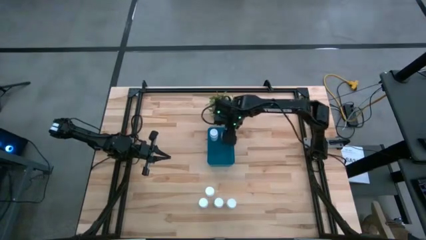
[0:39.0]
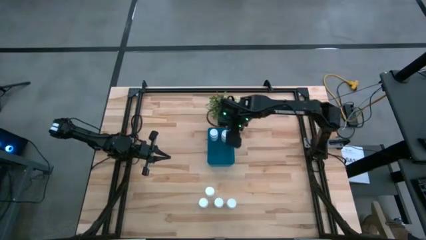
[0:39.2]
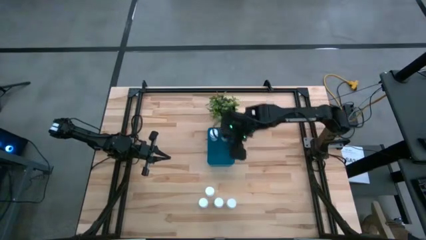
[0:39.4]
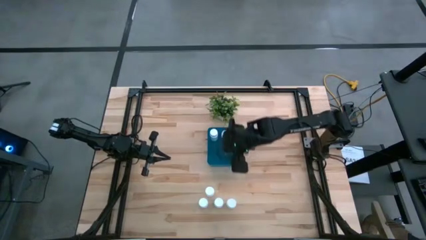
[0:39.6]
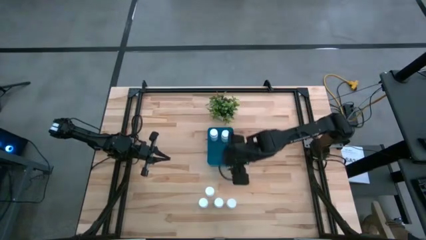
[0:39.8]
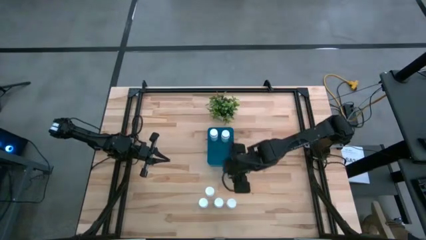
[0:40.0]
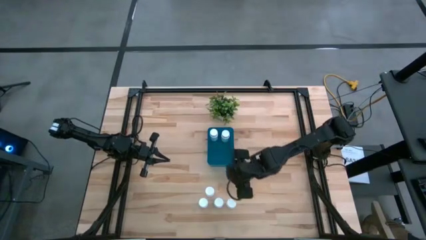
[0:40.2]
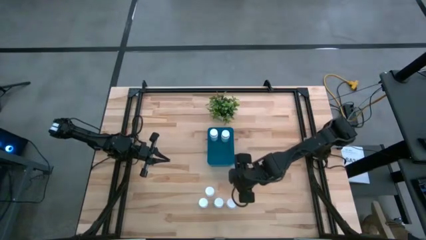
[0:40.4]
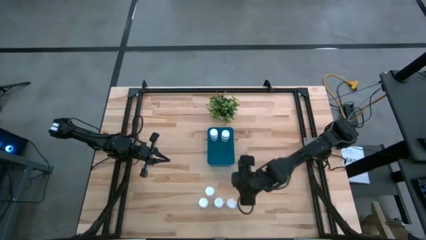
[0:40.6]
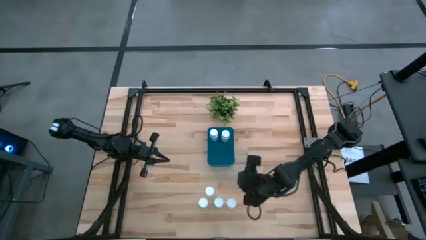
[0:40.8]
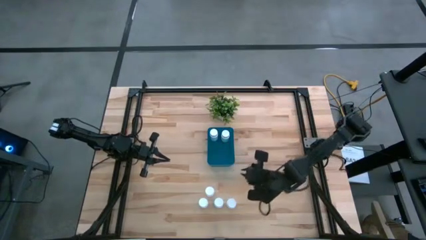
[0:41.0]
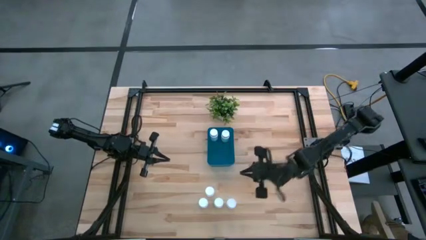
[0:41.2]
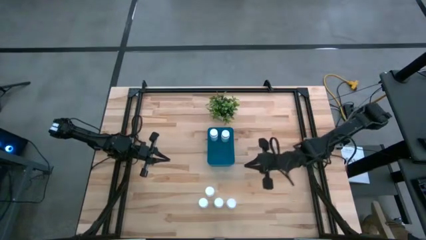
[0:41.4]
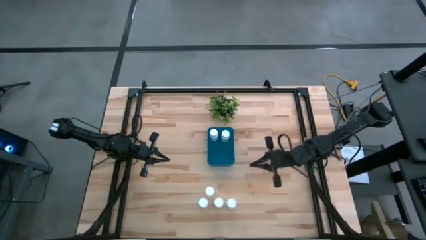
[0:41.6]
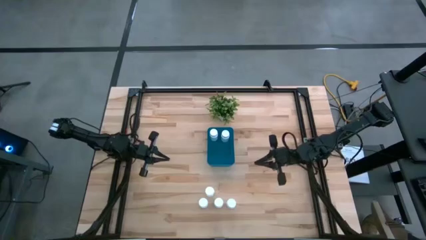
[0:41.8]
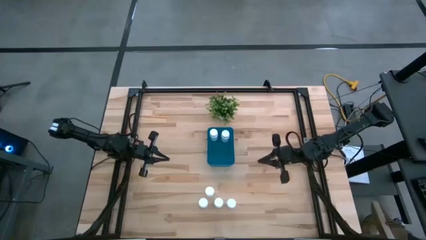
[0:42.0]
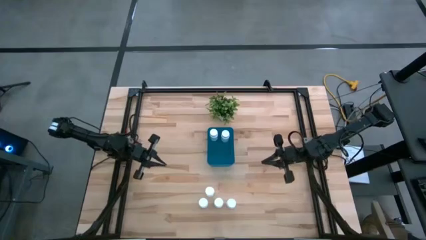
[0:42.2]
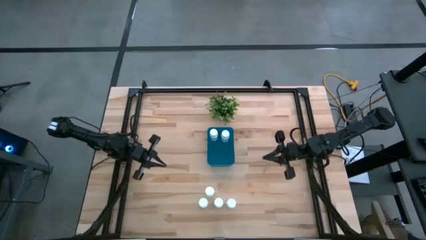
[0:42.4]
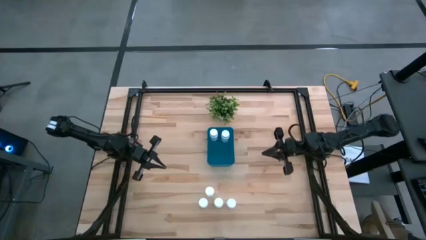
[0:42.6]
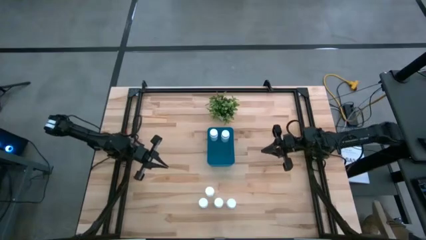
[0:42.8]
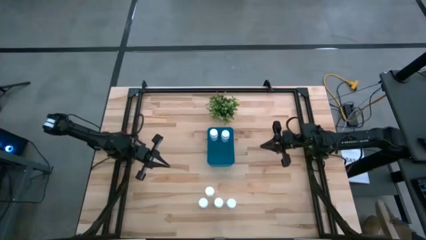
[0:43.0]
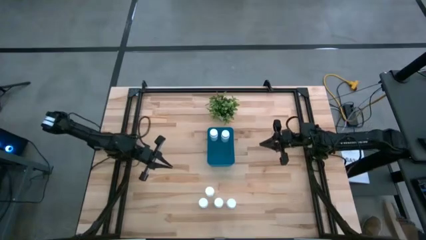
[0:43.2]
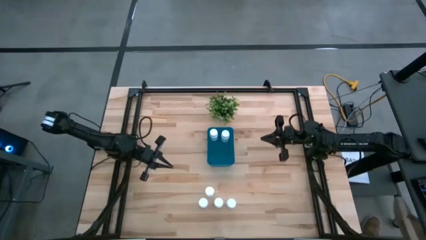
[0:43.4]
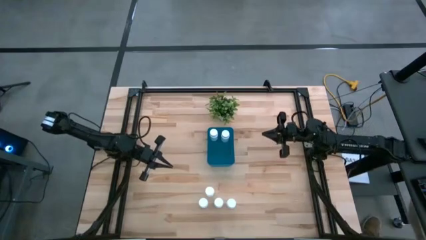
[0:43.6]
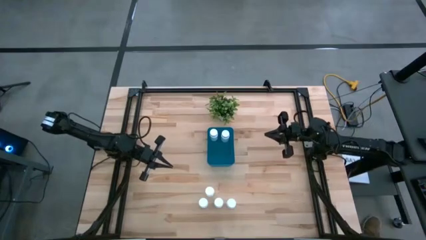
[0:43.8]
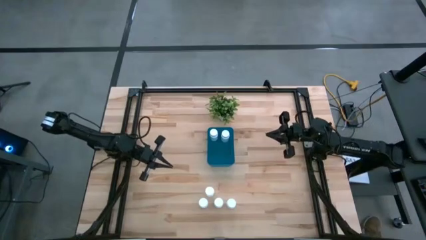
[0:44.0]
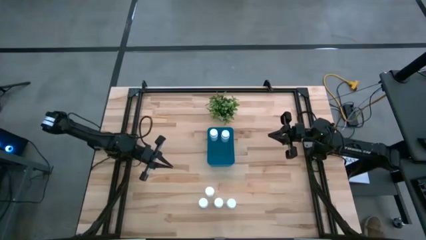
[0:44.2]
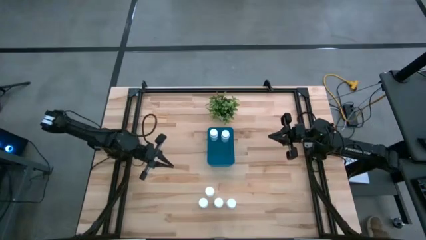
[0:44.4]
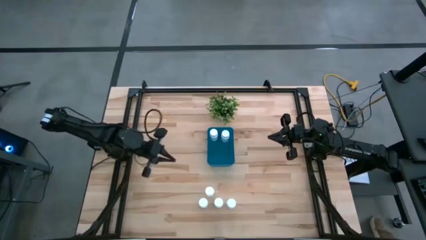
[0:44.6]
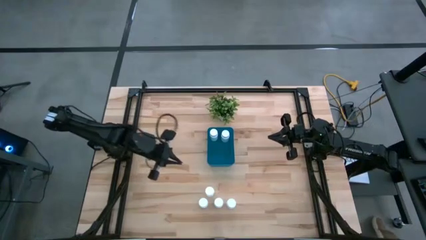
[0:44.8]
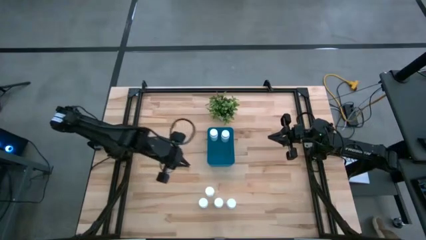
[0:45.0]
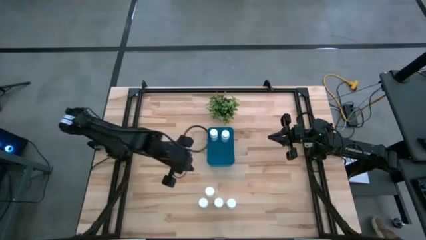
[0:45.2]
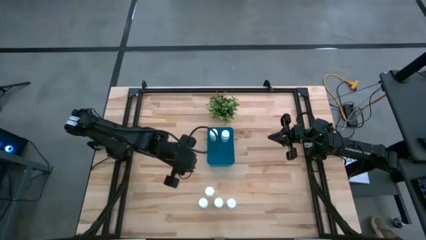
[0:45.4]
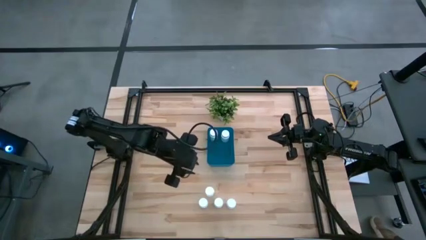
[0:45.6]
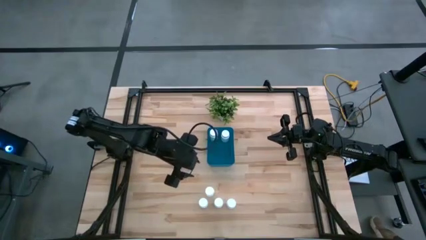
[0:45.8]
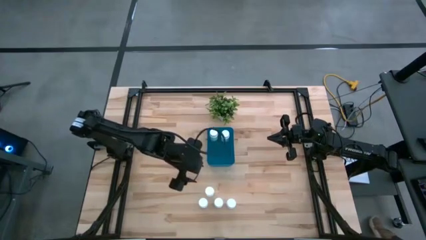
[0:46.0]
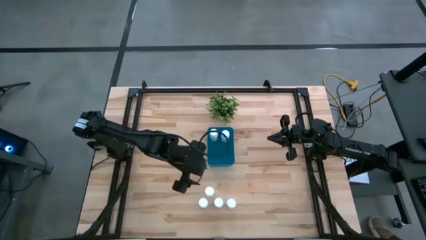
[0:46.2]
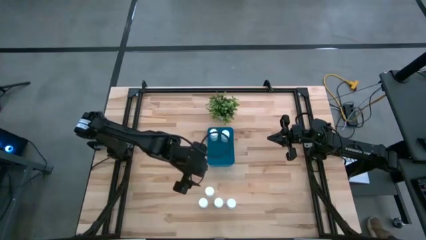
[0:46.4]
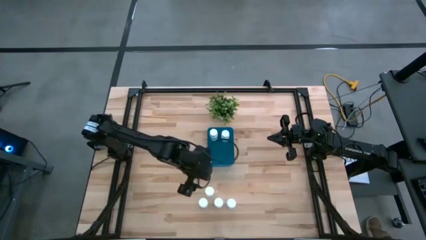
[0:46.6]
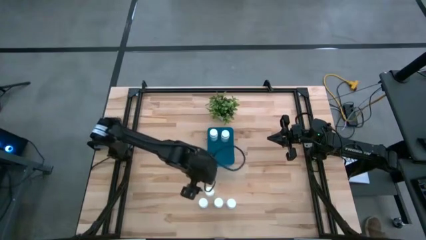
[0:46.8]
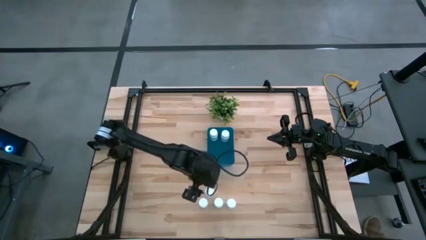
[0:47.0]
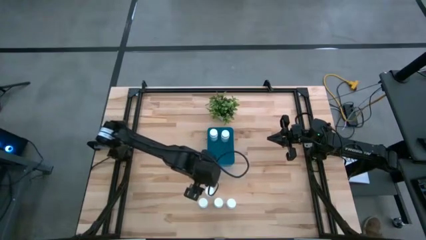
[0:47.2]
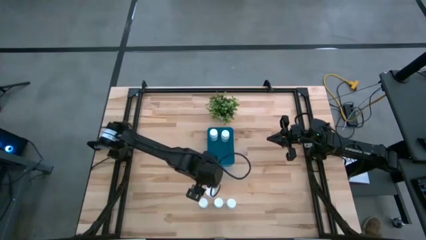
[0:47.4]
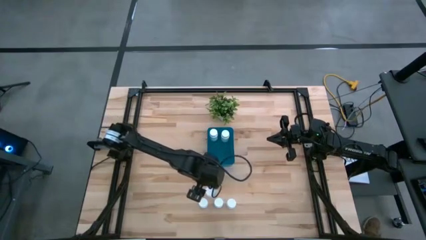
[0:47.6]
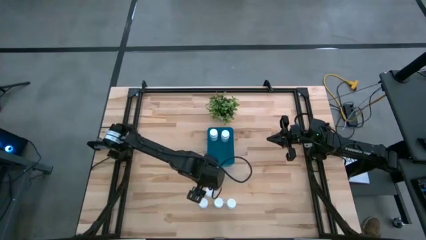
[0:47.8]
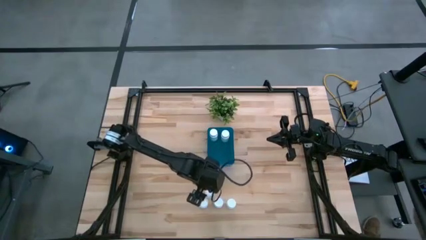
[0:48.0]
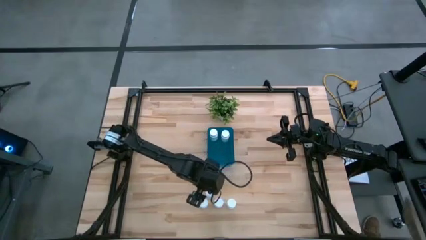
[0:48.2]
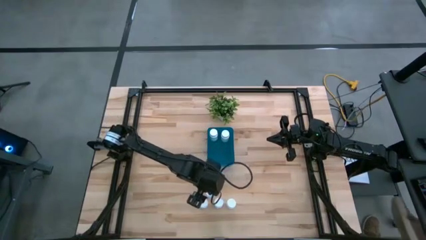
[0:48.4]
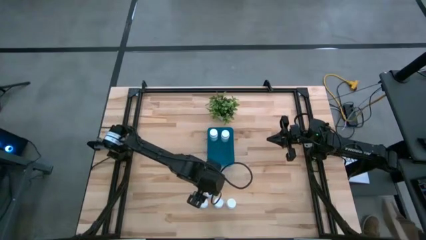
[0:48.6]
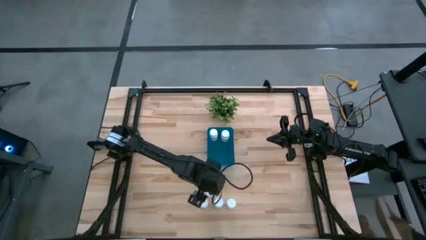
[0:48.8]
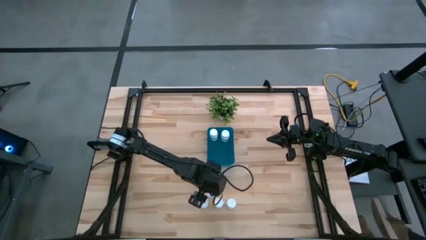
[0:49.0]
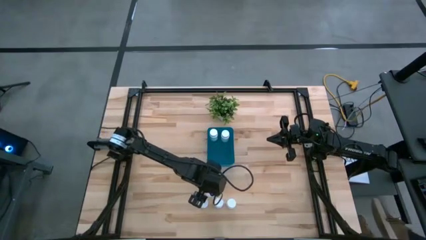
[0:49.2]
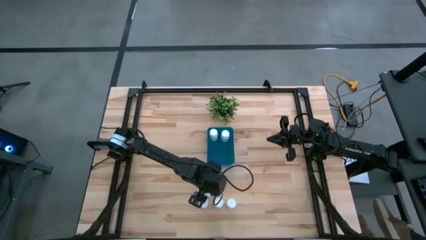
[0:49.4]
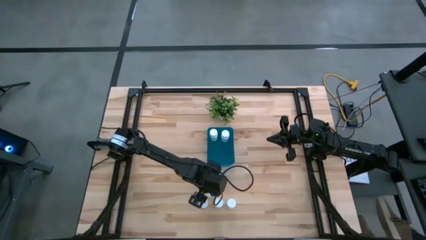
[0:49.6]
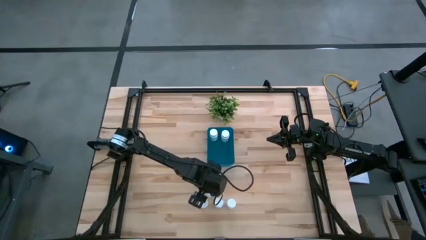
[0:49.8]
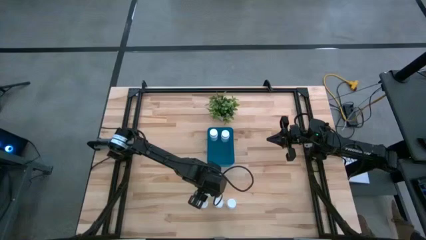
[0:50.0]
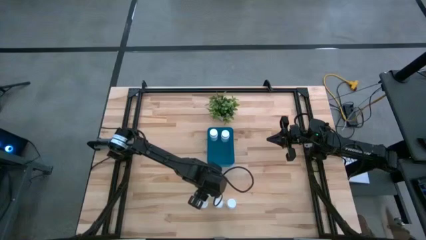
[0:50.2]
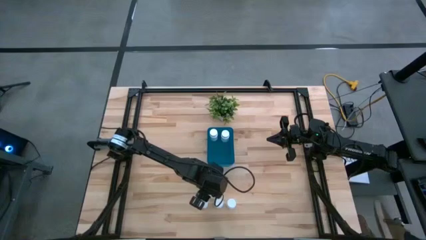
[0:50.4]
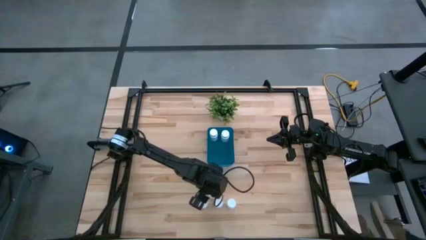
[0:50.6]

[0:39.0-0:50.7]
Task: Pick and place pill bottles into a basket
Put the white pill bottle into the blue bin

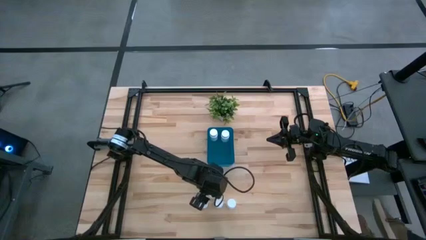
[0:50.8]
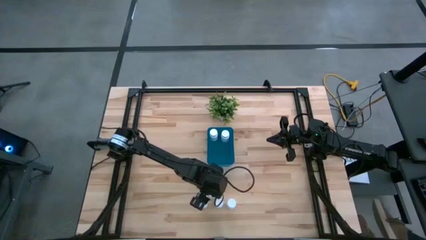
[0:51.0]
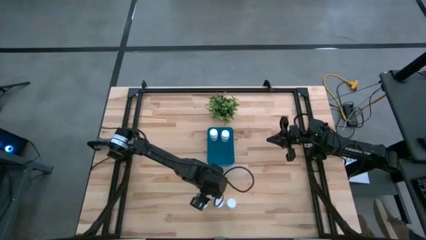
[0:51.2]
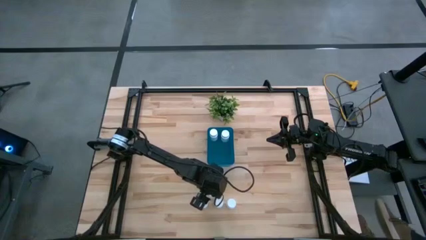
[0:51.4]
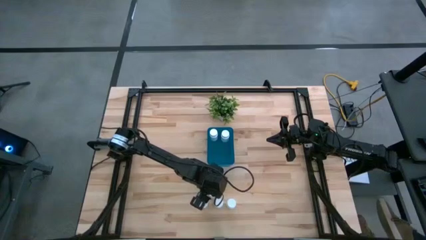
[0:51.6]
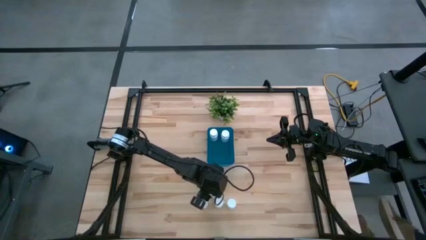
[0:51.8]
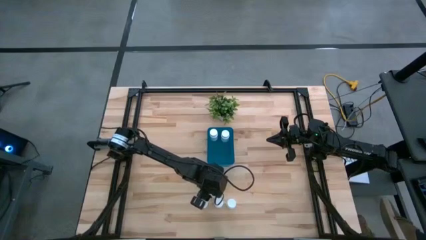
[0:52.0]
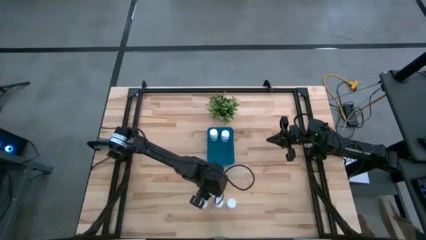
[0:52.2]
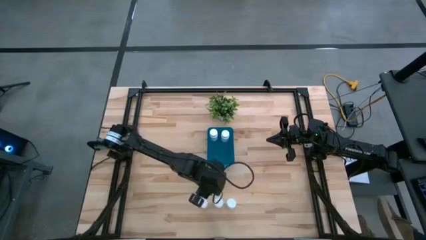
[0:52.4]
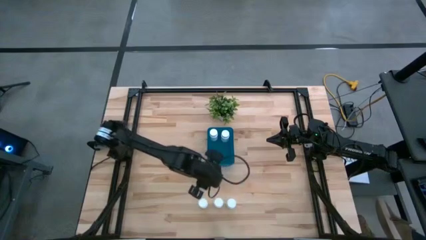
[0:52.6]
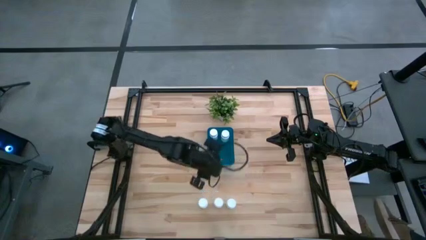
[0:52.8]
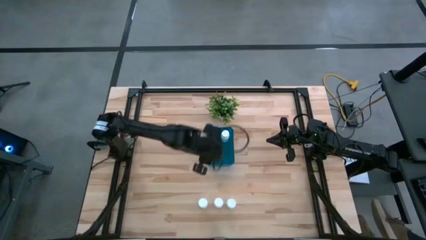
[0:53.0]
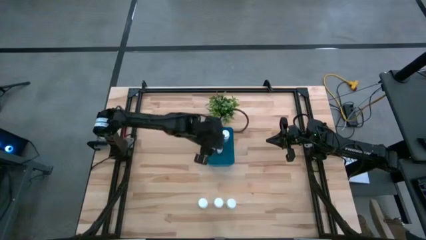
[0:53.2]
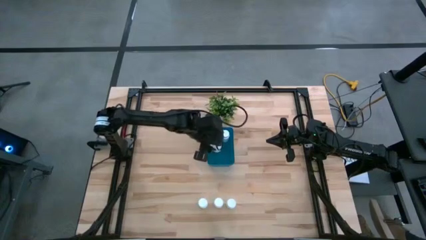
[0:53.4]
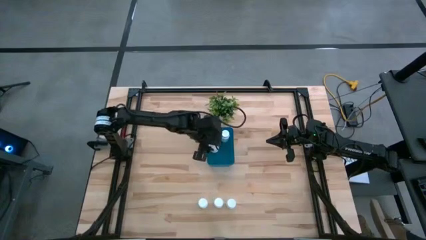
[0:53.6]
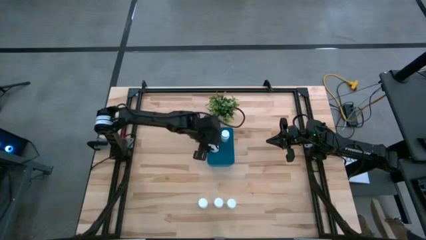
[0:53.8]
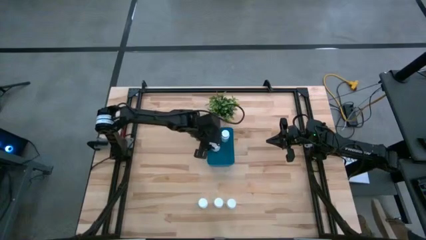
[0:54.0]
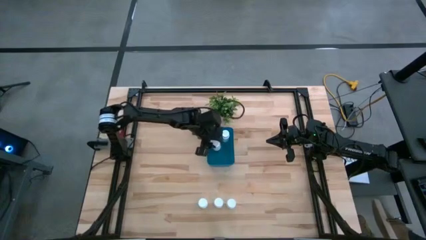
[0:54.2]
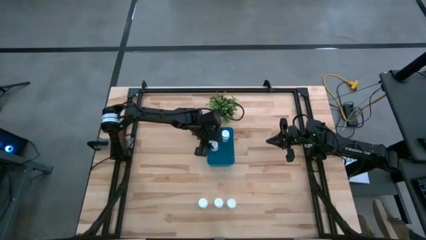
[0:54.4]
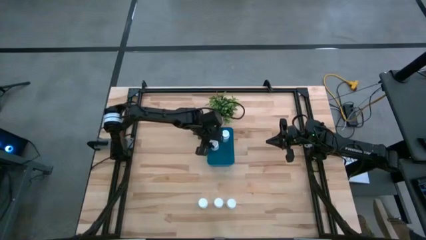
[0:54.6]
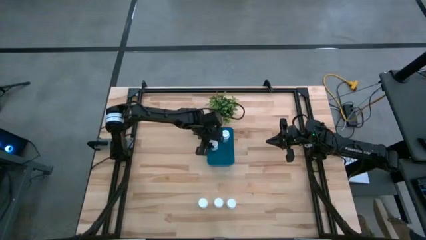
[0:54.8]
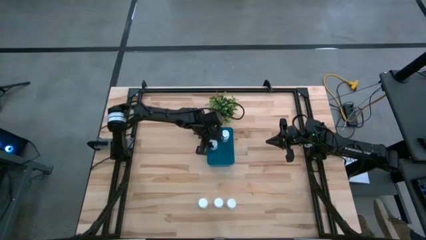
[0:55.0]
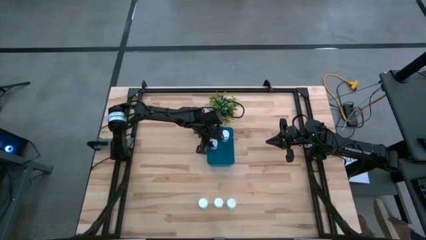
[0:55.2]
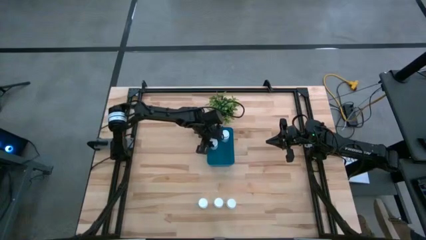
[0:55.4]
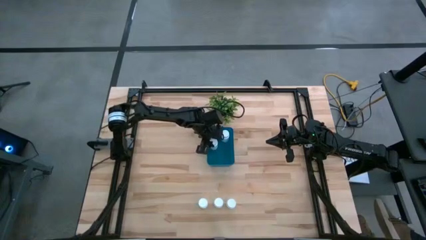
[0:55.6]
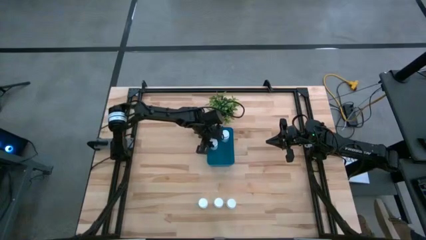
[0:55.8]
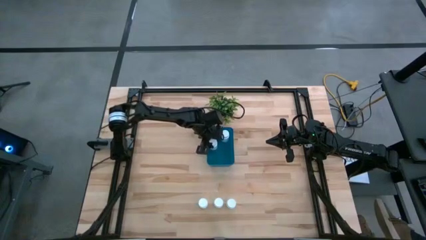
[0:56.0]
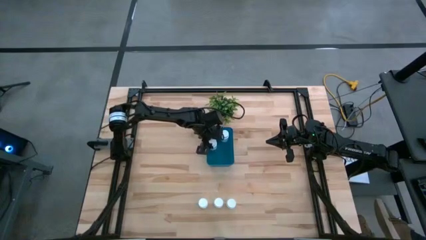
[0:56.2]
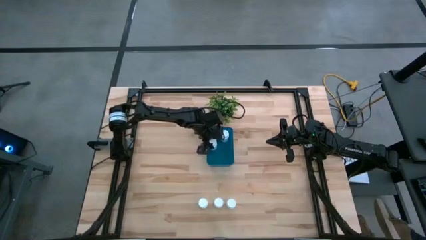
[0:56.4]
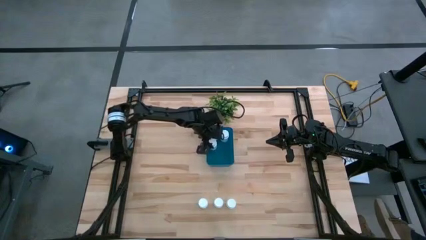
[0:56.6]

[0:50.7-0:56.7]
Put the white pill bottle into the blue bin
